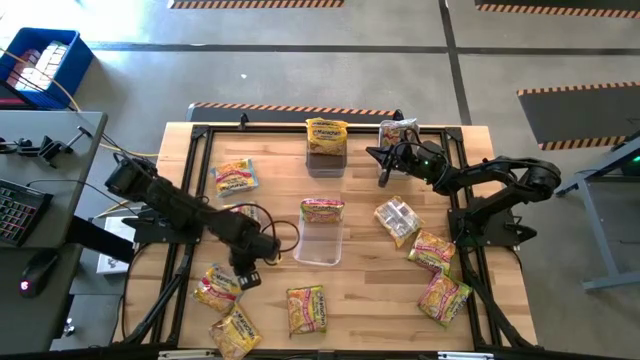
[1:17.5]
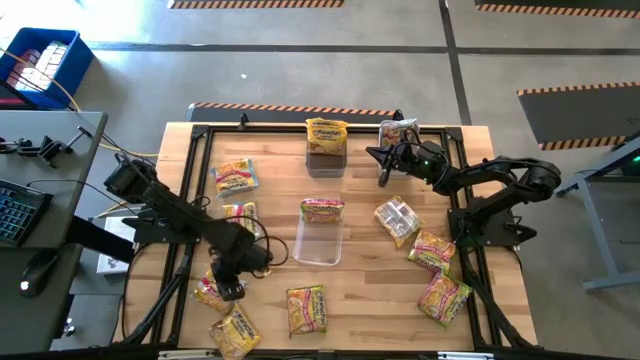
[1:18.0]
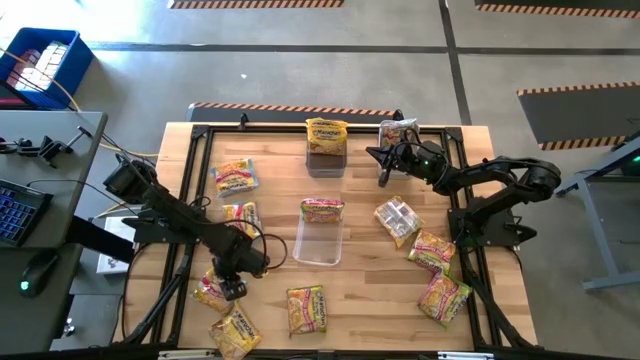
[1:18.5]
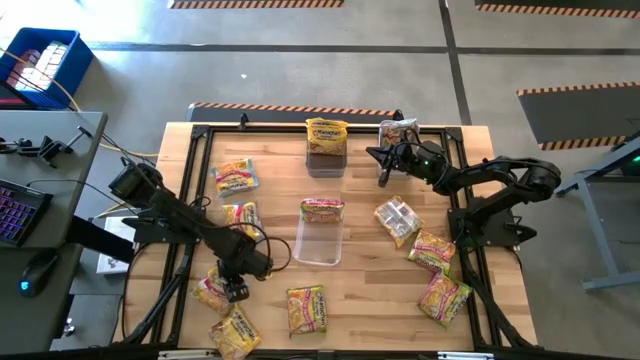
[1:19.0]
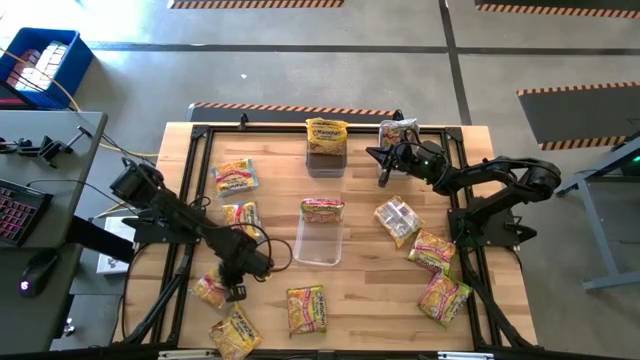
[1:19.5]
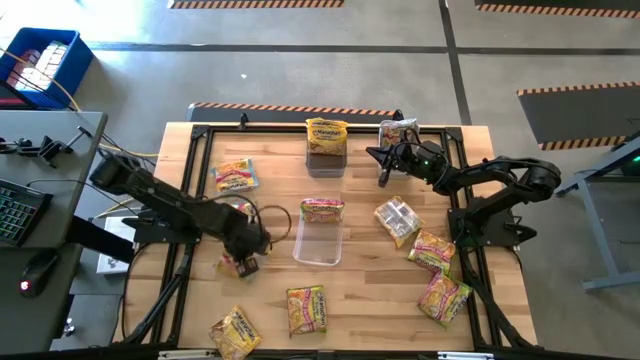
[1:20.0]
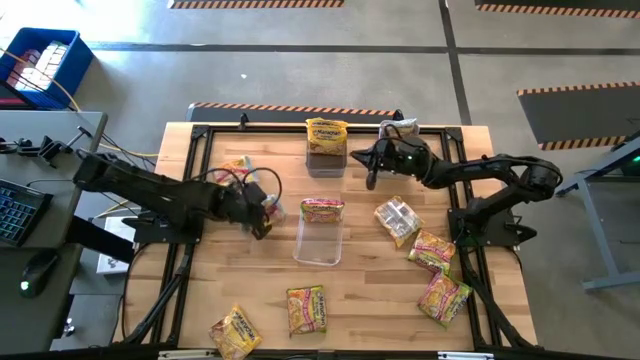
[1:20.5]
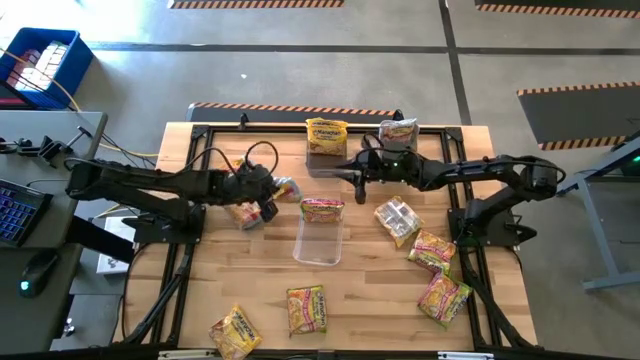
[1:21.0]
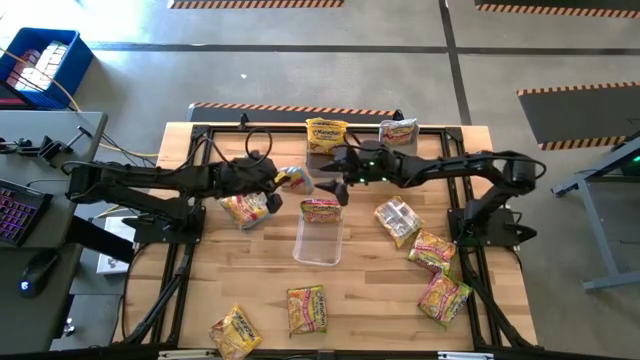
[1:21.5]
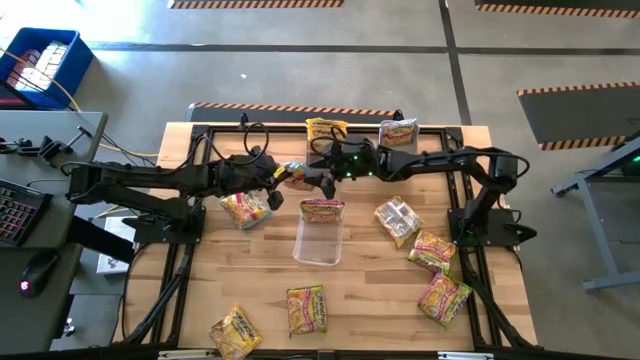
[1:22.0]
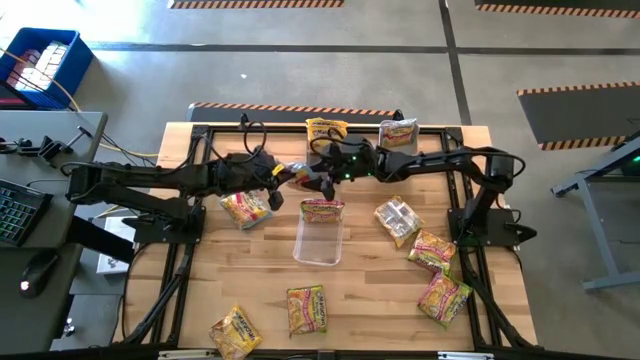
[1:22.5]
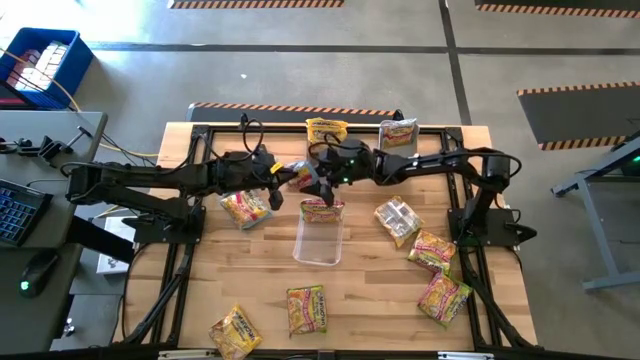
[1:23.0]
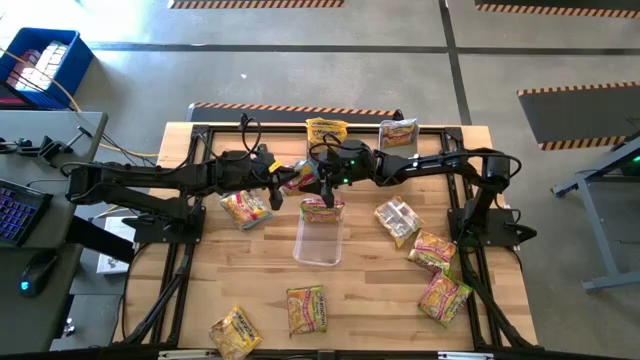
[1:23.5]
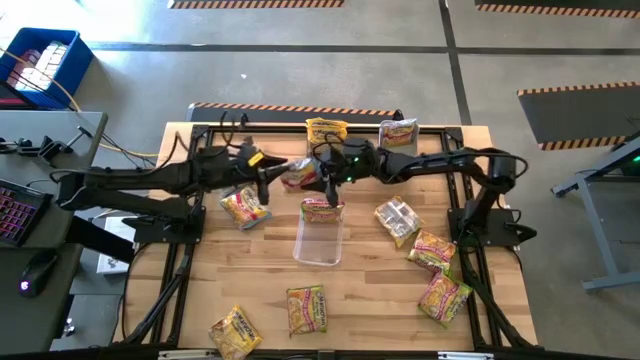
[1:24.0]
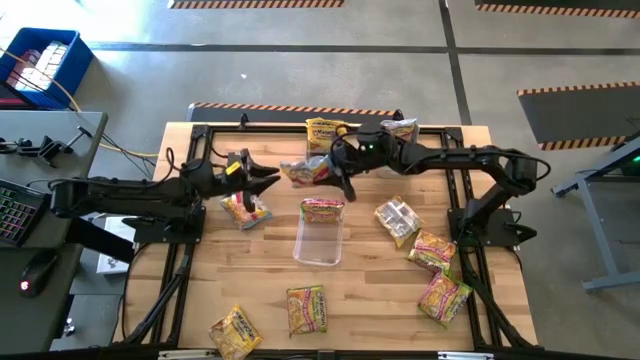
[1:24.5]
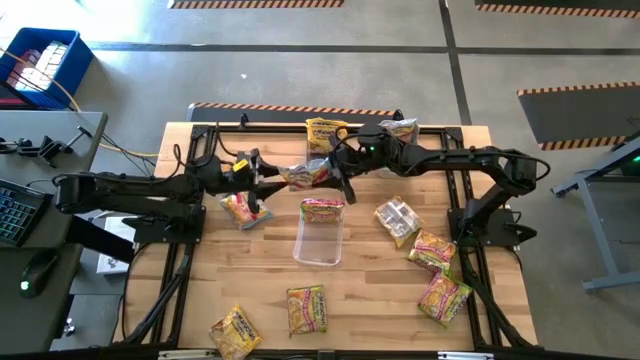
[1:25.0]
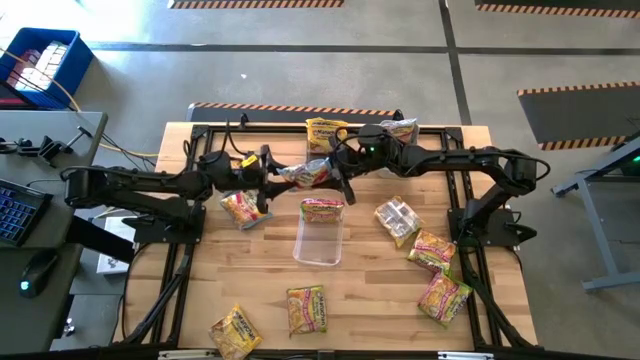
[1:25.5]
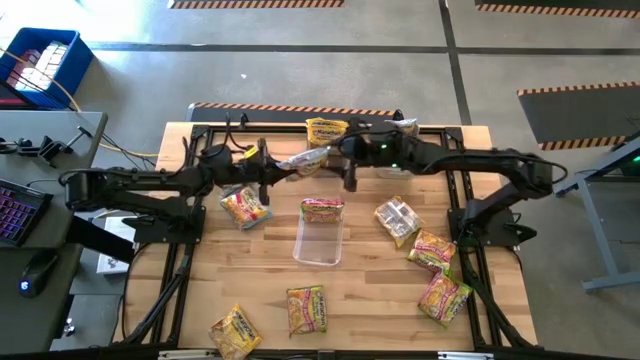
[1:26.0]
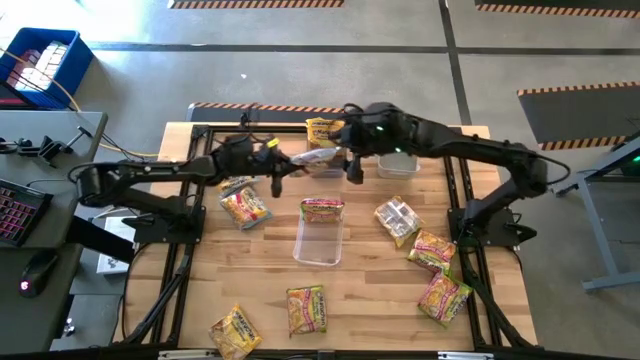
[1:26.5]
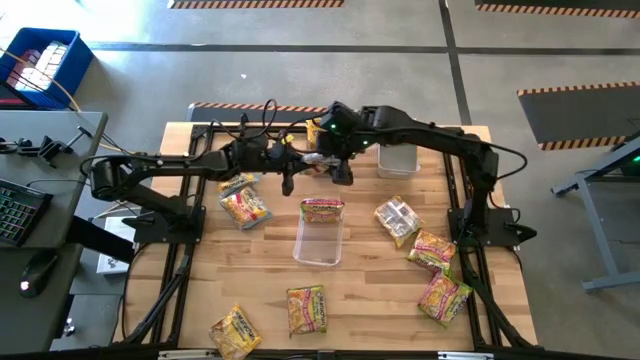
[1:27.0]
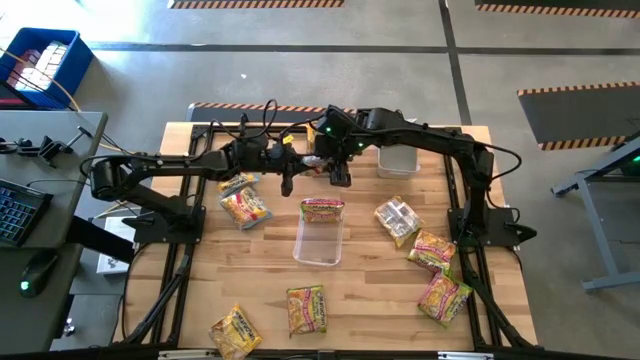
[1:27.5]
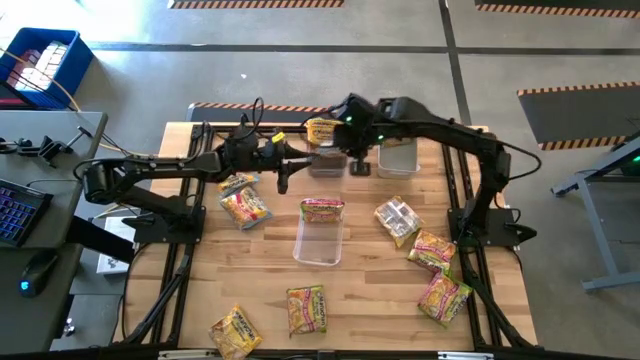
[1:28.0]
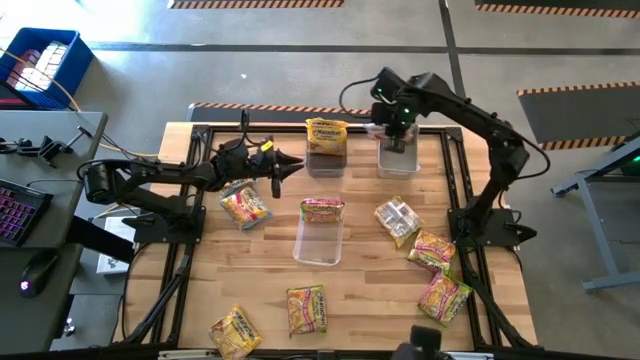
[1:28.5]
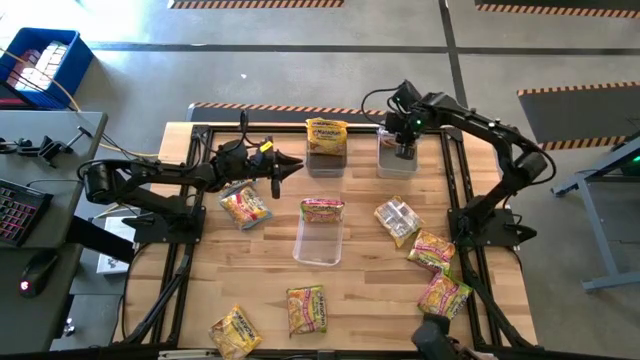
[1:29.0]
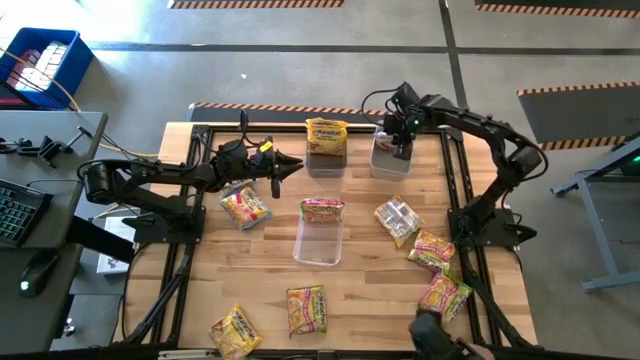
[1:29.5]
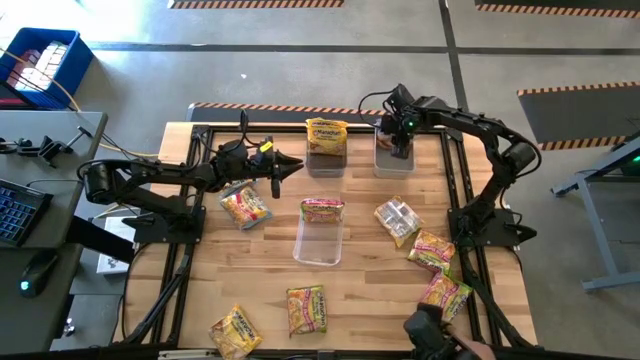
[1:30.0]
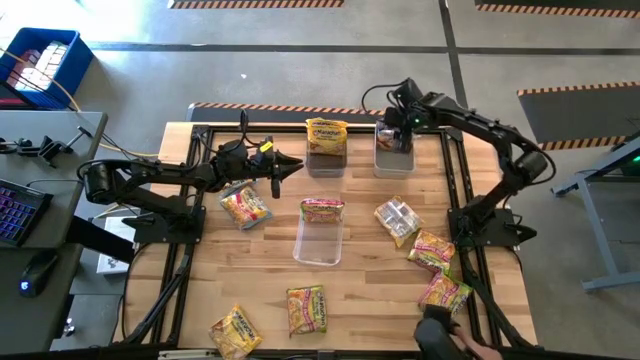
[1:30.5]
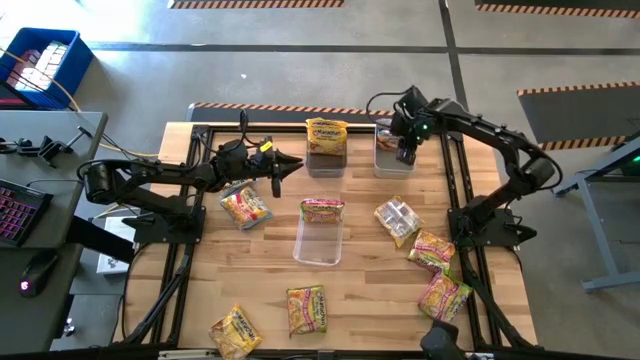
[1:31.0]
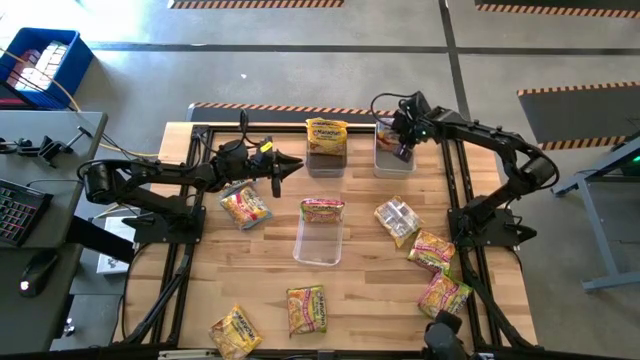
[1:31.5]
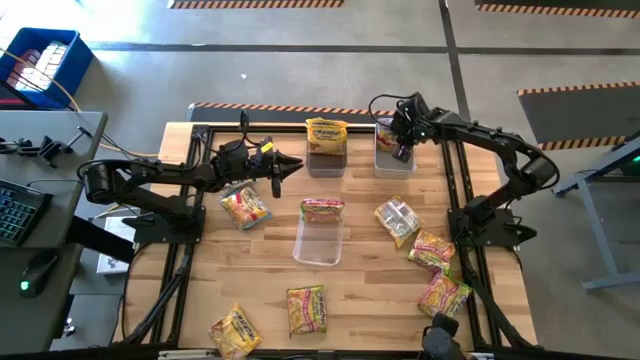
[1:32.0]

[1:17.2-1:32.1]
Task: Sort Maruchan noodles
Put the blue noodle pack into the white bin

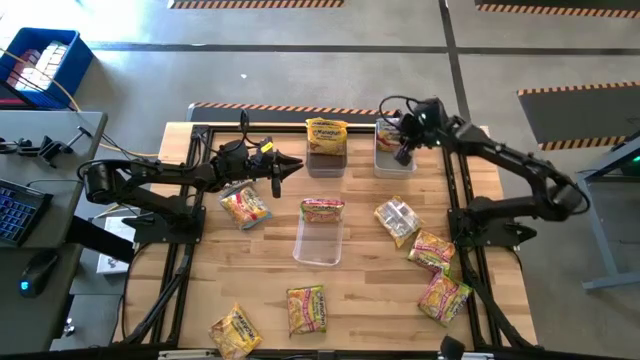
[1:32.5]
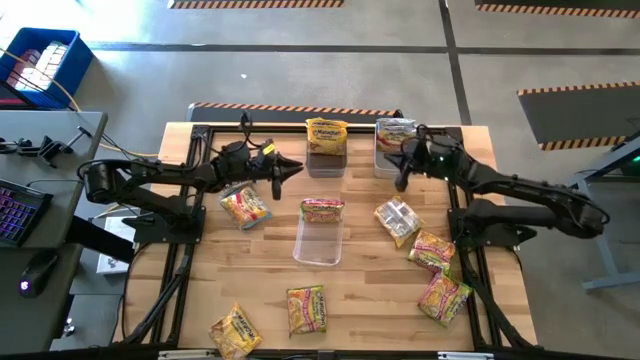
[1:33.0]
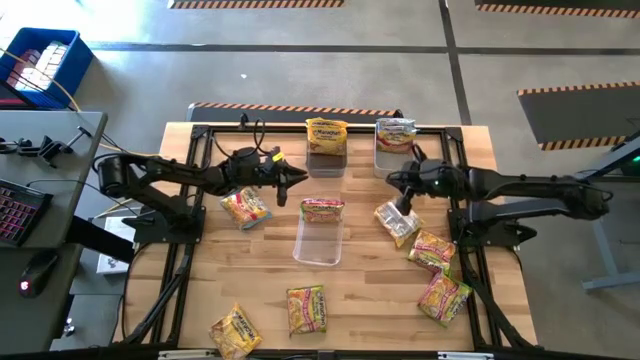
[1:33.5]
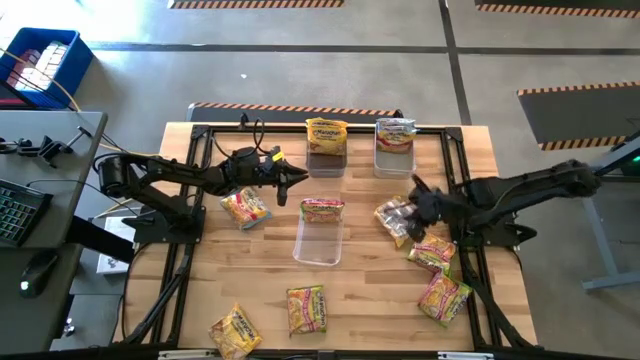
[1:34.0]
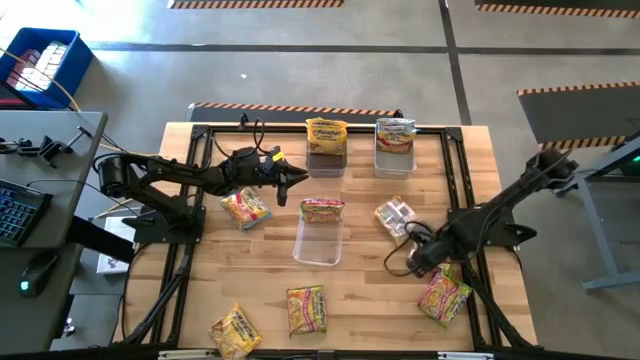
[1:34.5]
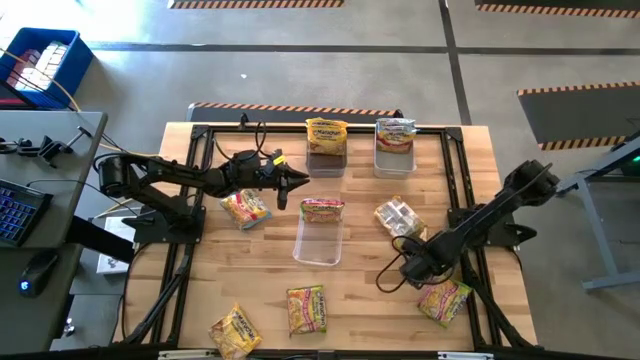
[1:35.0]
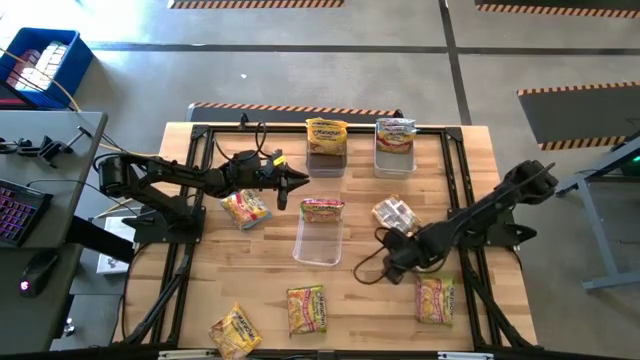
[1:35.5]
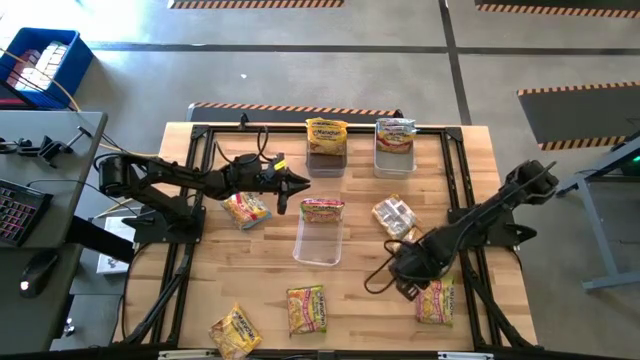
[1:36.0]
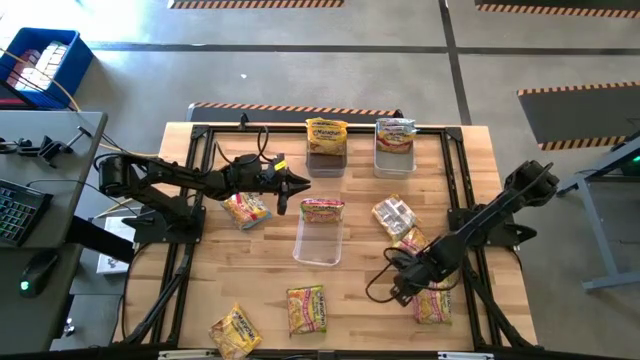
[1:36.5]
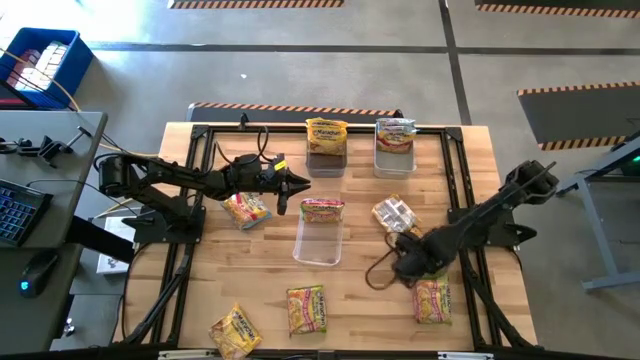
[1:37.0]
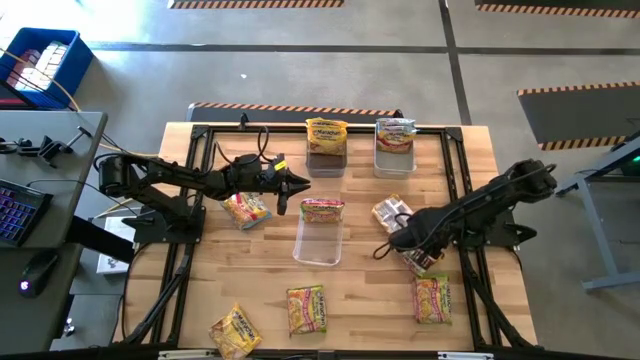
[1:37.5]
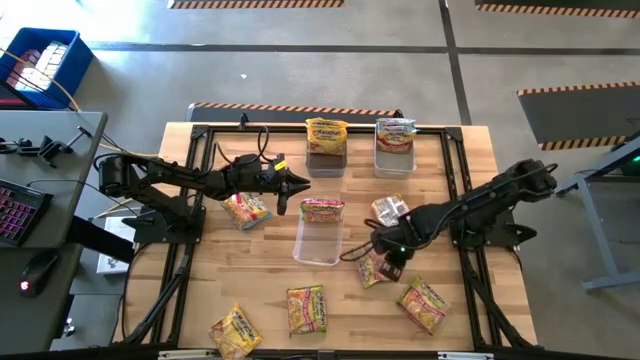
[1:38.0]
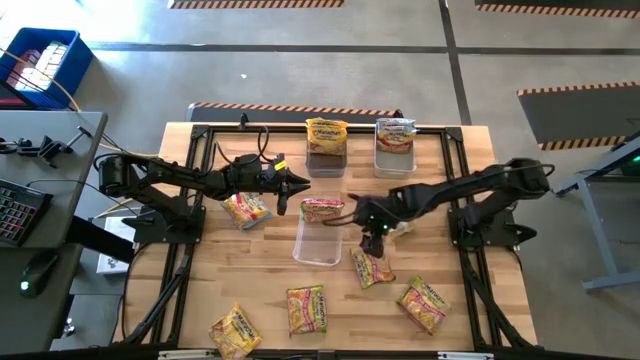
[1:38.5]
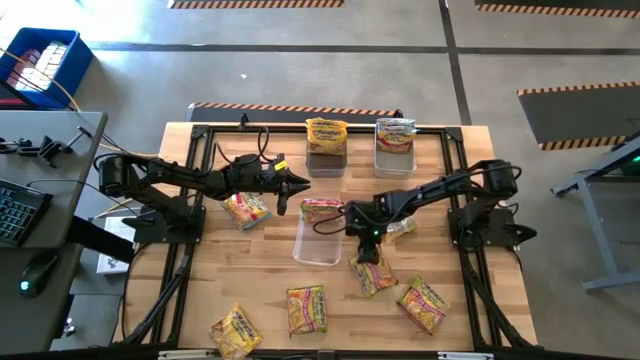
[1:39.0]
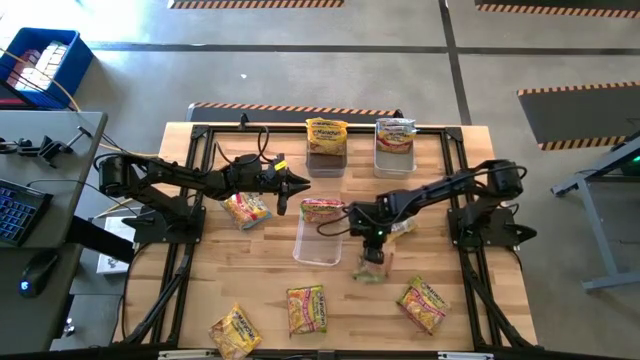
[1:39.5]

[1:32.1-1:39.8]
Put the green noodle pack into the transparent bin
